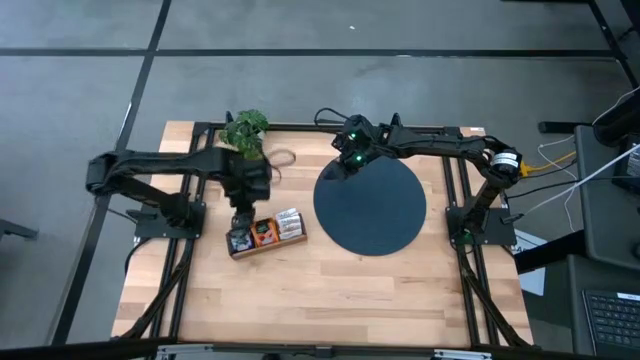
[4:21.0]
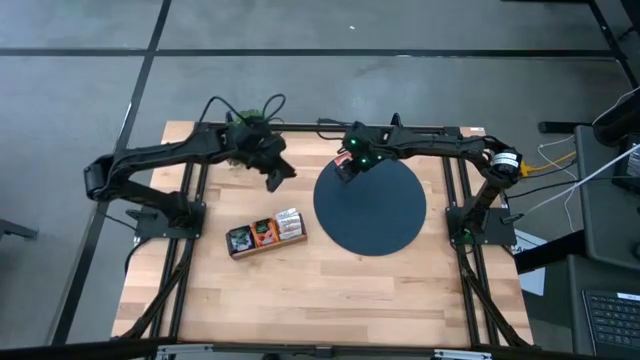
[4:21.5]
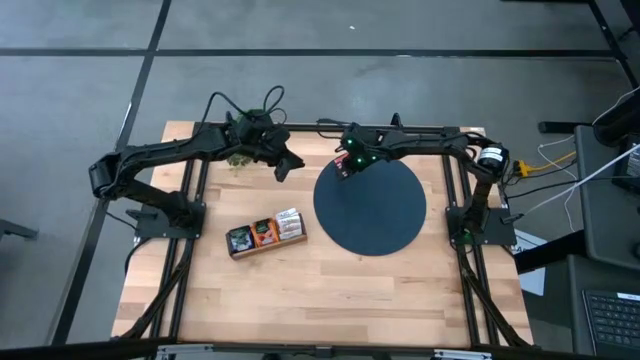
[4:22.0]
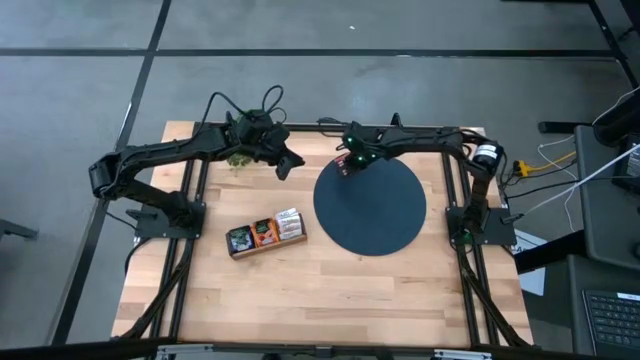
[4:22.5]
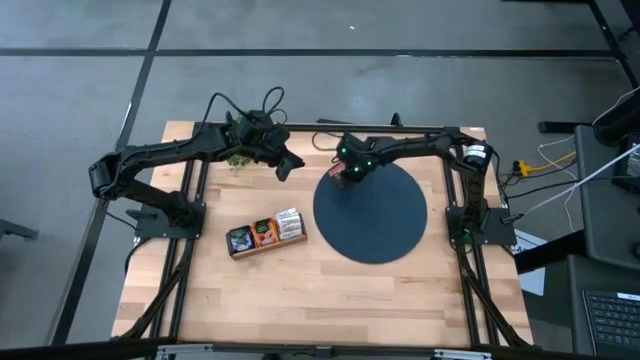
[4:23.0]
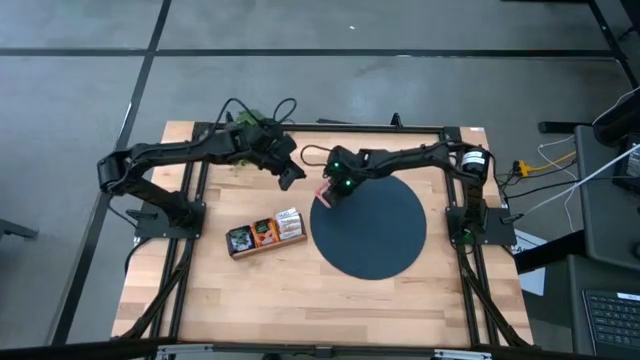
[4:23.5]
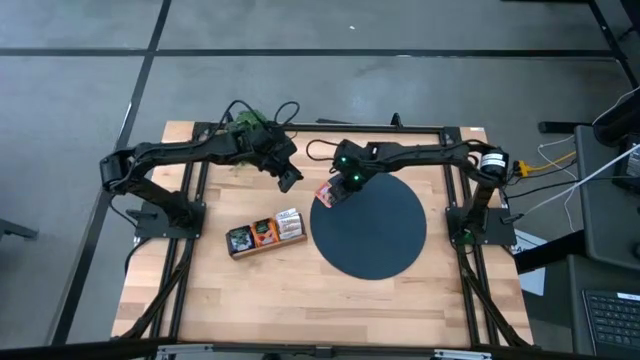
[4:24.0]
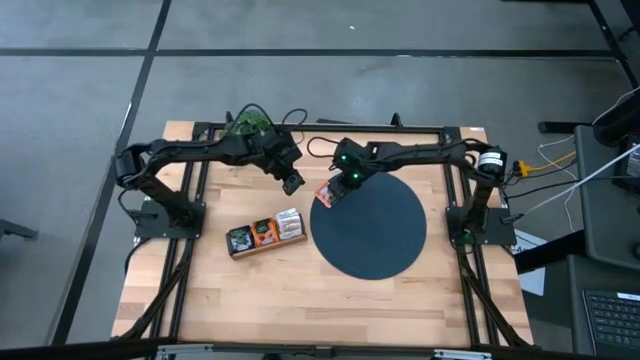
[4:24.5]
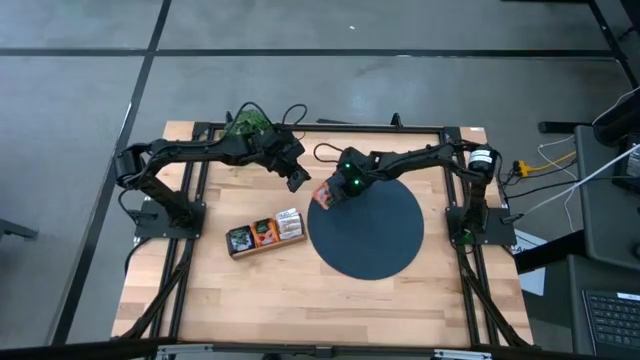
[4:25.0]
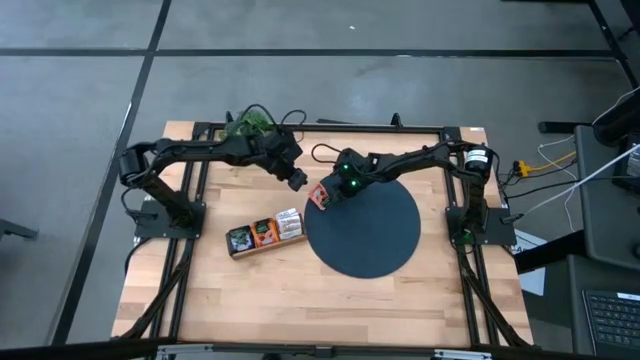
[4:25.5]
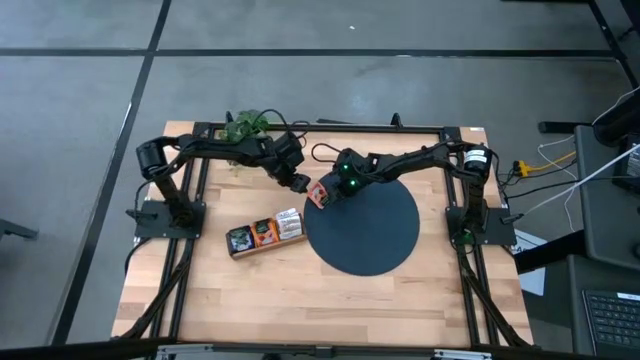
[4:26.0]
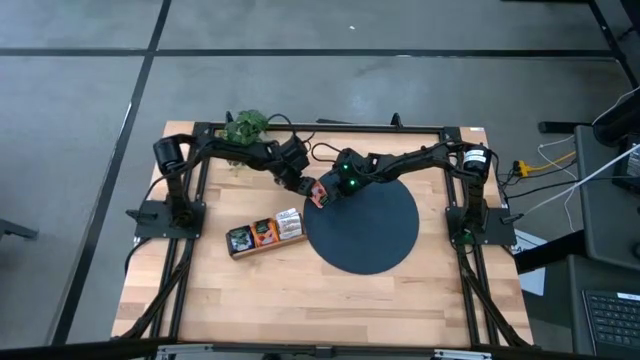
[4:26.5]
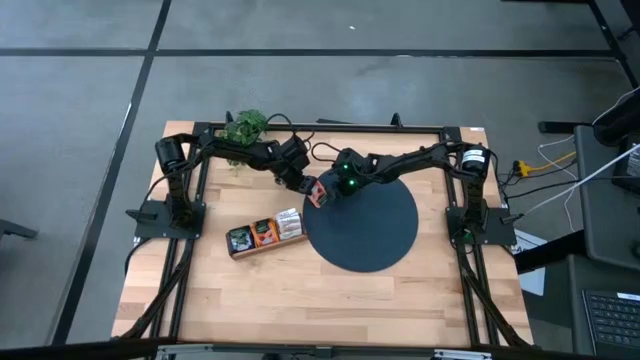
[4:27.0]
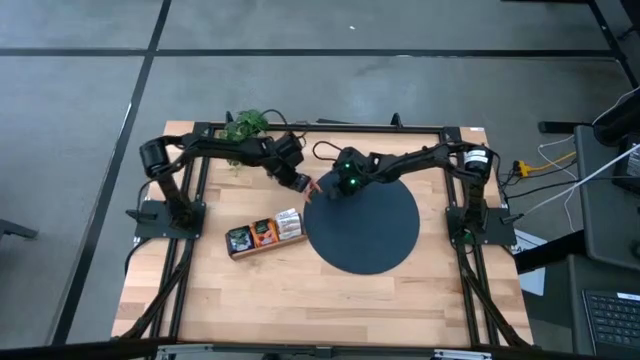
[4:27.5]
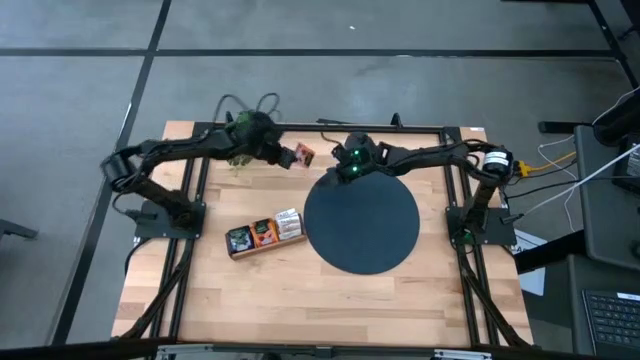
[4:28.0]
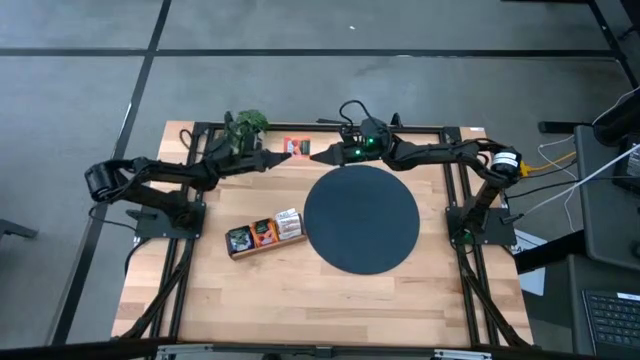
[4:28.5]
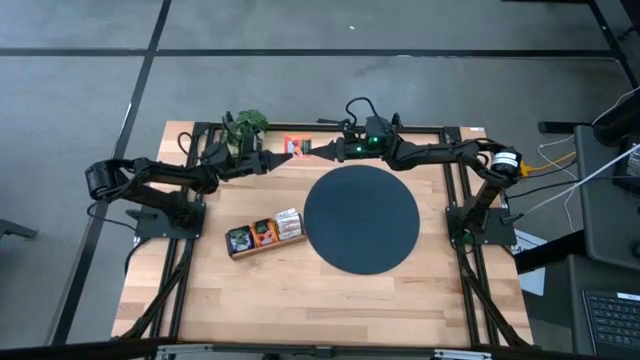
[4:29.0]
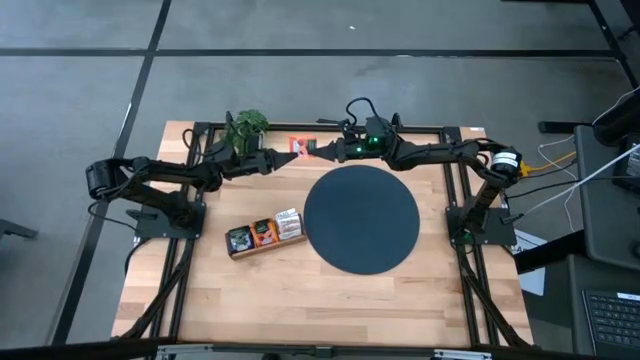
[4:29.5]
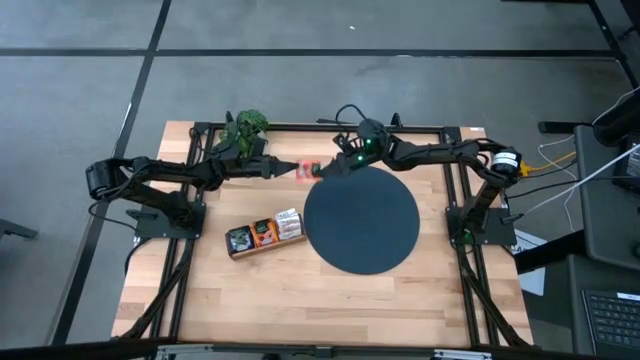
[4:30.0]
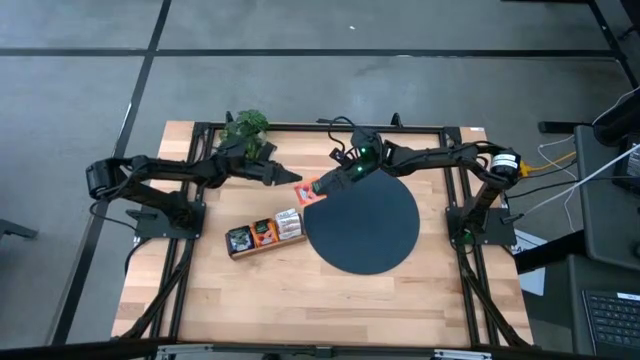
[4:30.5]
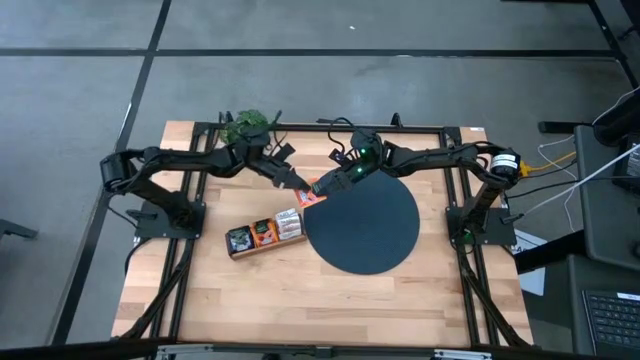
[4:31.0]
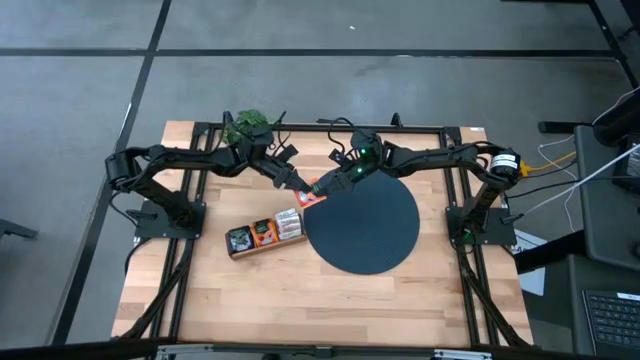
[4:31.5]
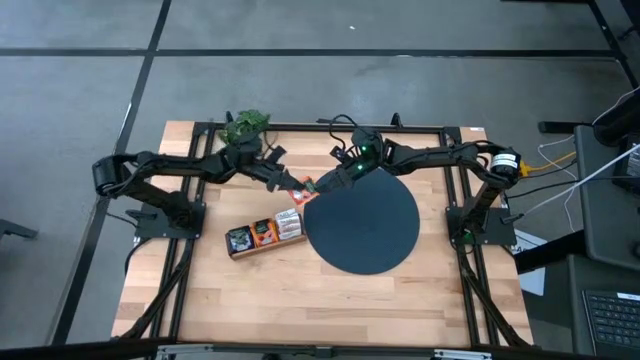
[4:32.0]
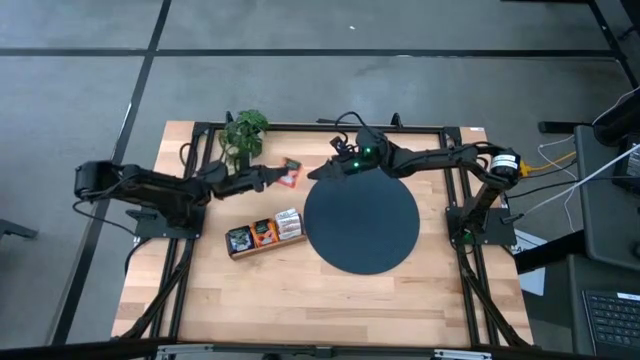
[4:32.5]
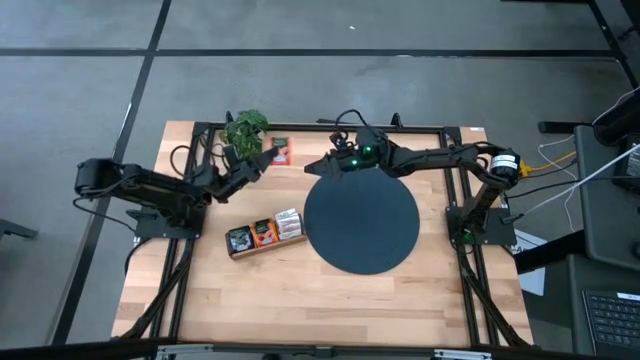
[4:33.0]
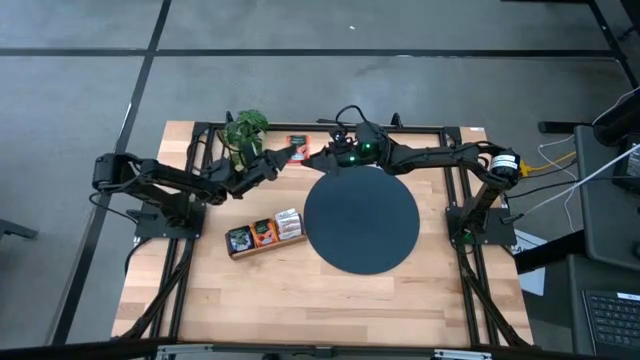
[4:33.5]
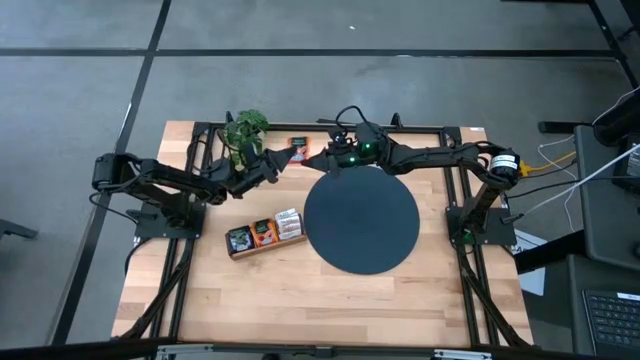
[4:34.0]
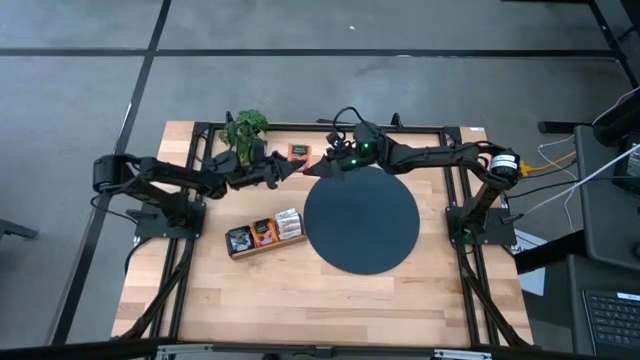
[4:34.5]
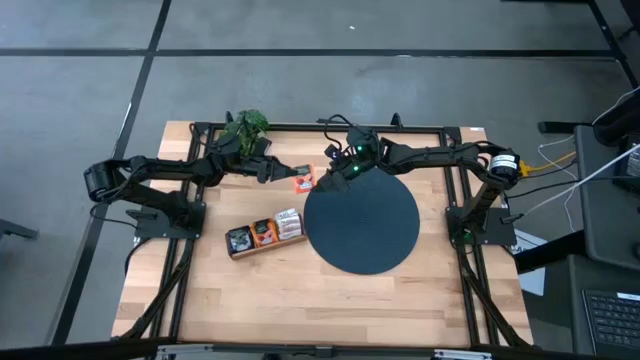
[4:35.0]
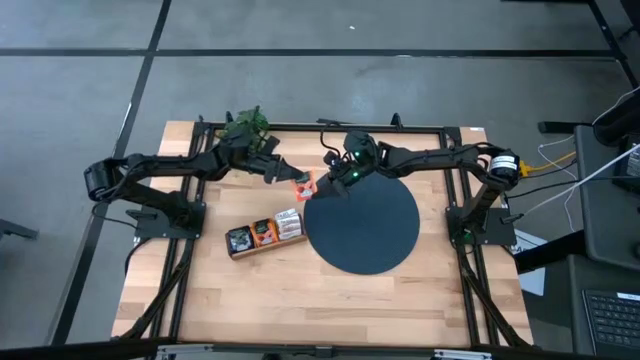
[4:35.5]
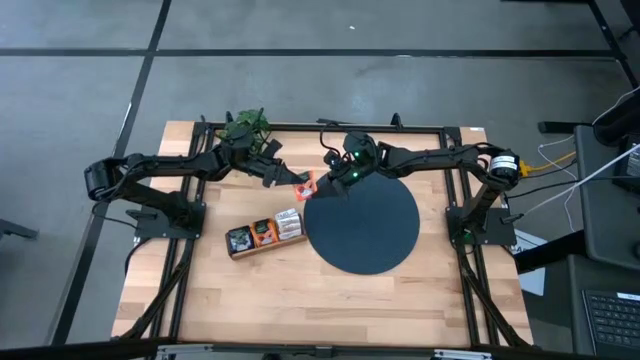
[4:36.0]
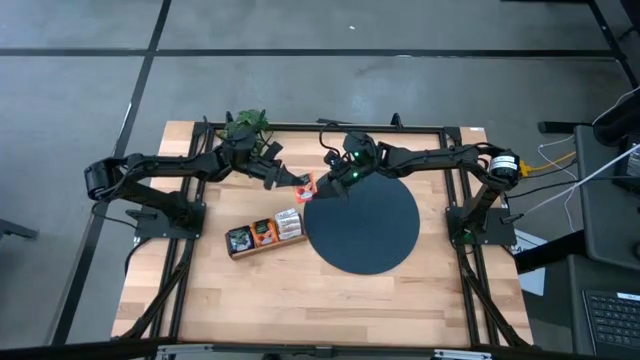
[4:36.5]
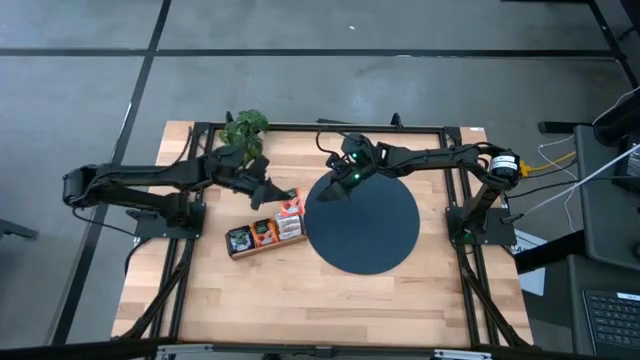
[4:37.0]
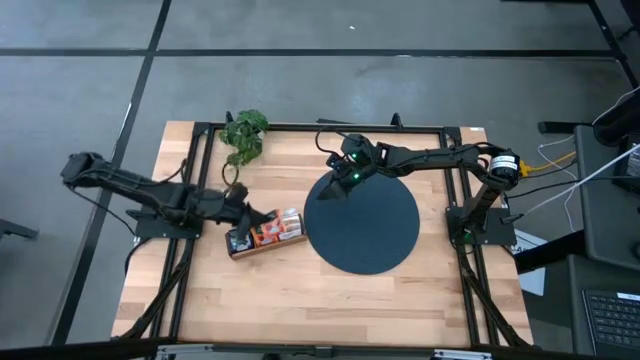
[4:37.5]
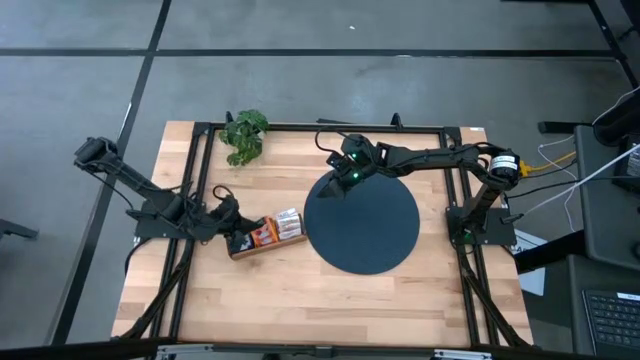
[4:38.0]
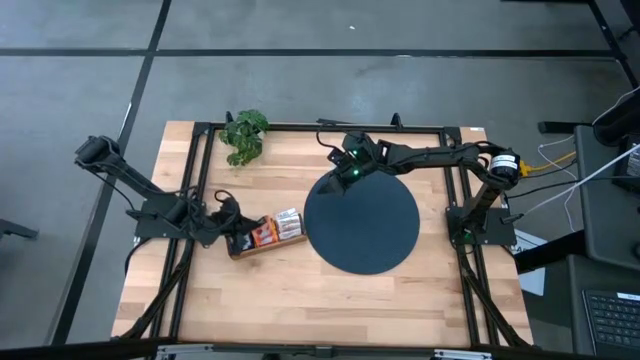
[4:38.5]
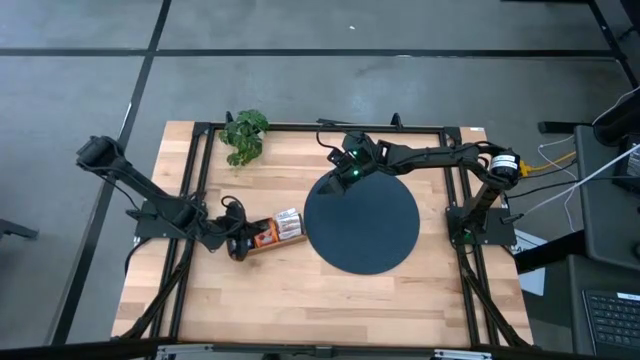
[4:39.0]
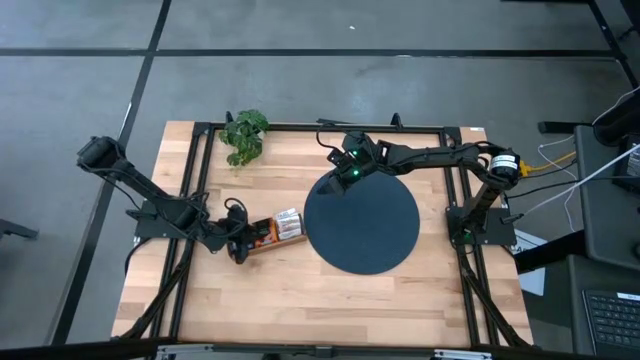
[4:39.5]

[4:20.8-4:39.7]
Task: Pick & Place Tea
Put the orange tea bag into the middle section of the wooden organizer

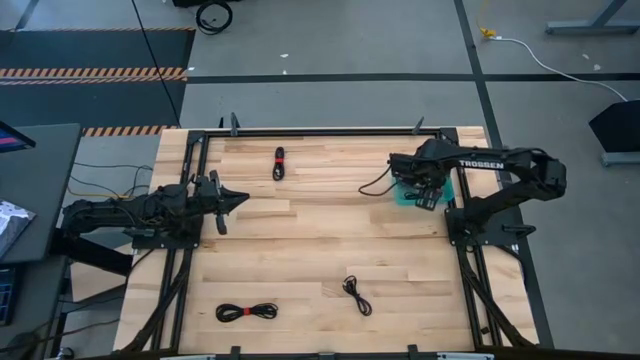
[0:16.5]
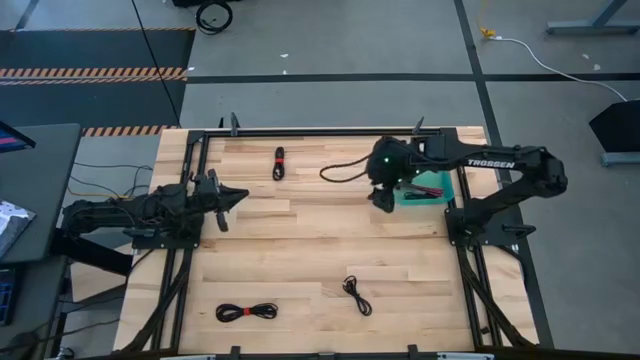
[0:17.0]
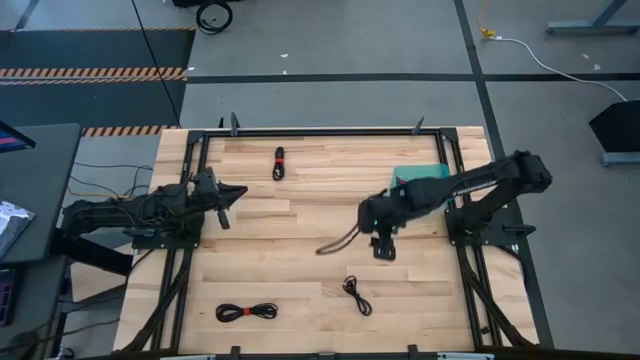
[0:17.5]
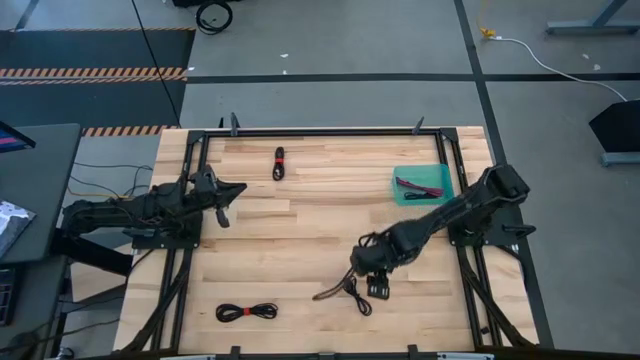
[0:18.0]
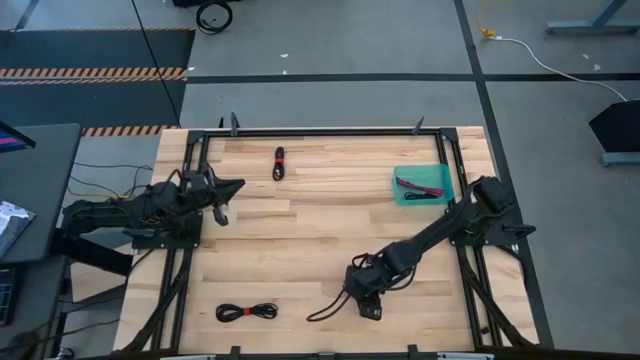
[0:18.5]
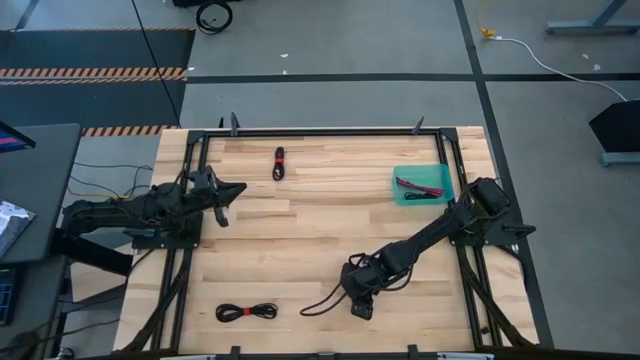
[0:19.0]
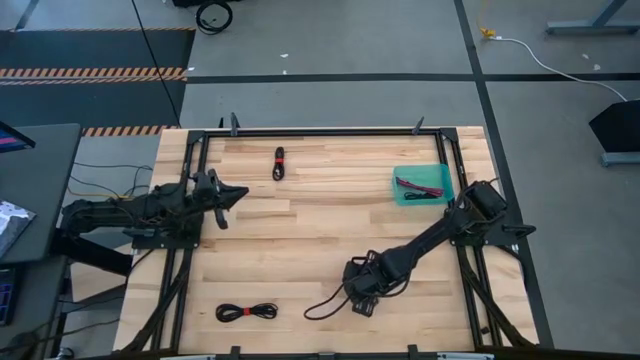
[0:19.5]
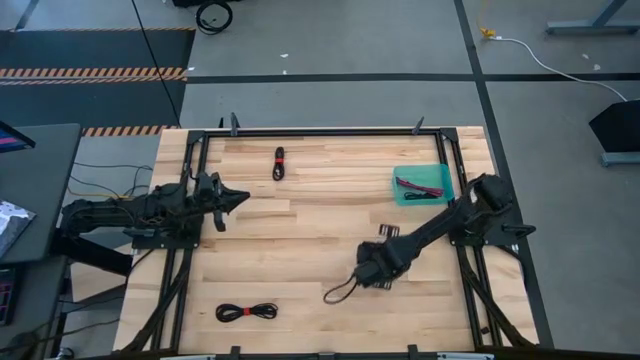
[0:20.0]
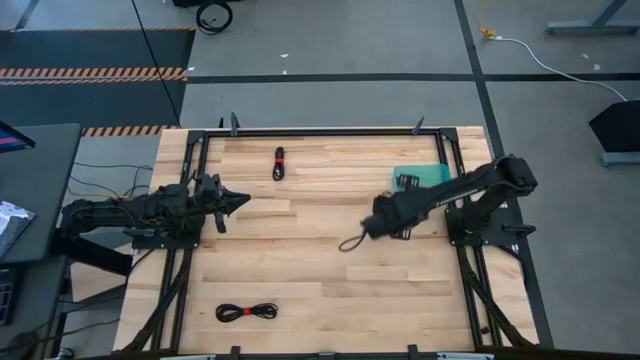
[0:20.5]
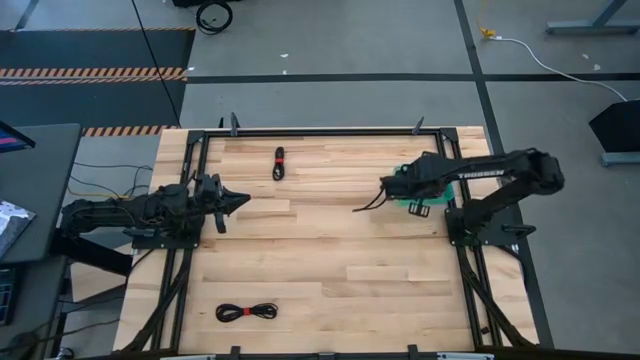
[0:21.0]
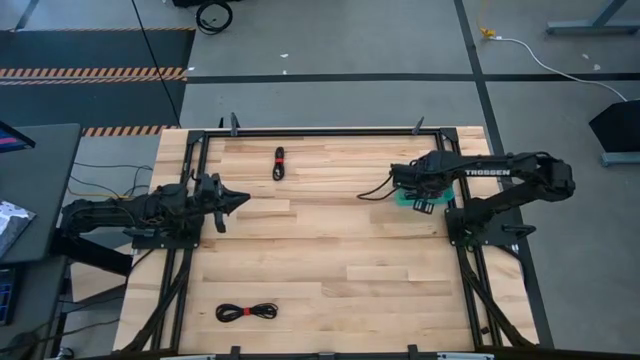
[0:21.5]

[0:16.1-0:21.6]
Task: Pick and place USB-C Cables
Put the bottom right black charger cable into the bin
